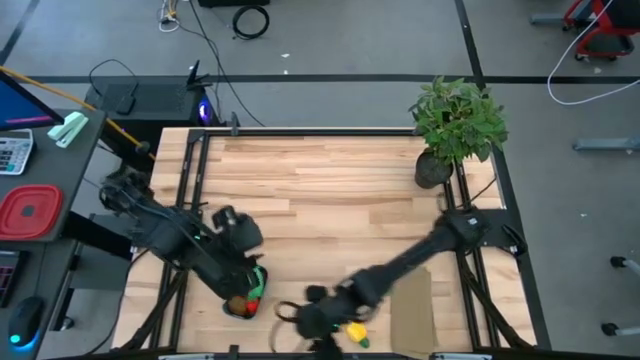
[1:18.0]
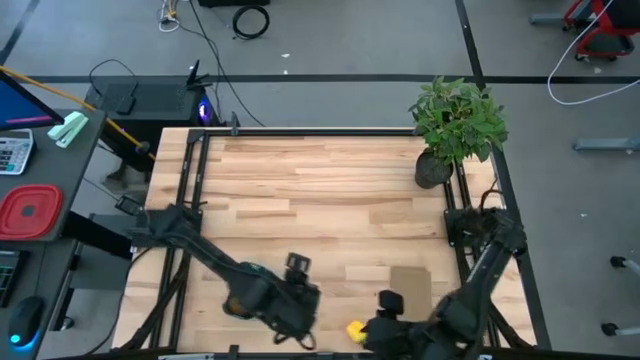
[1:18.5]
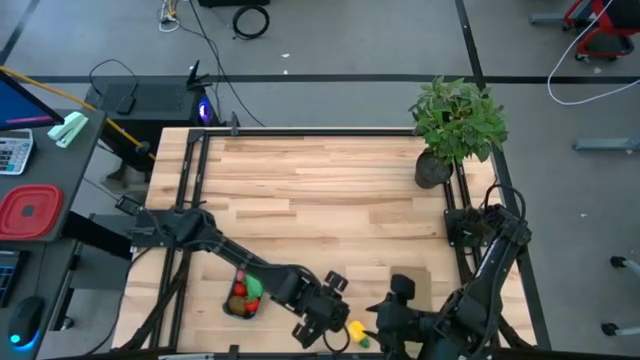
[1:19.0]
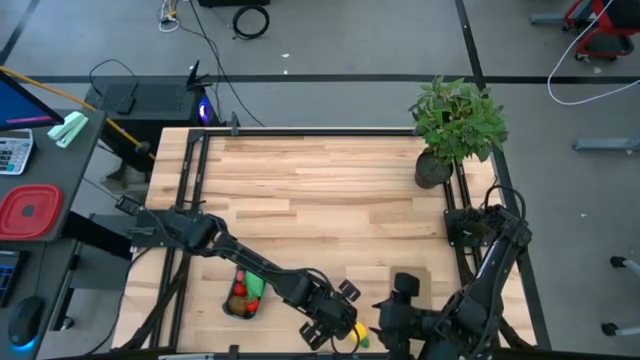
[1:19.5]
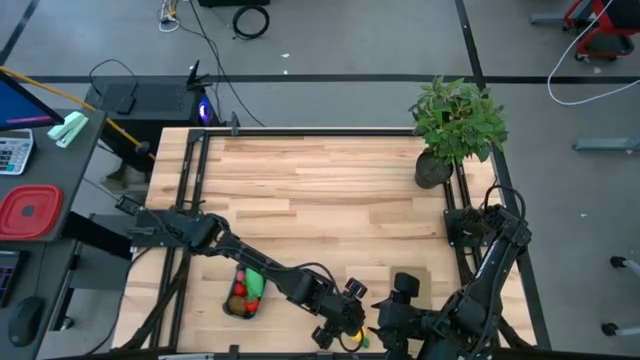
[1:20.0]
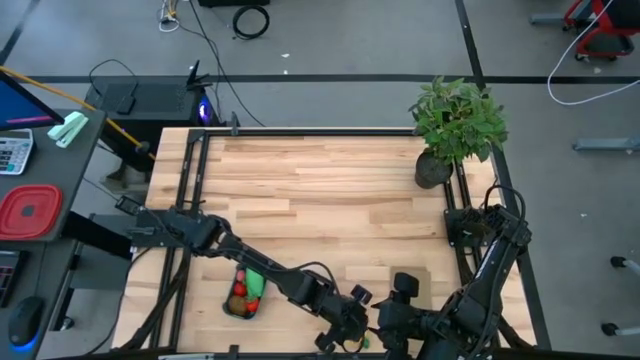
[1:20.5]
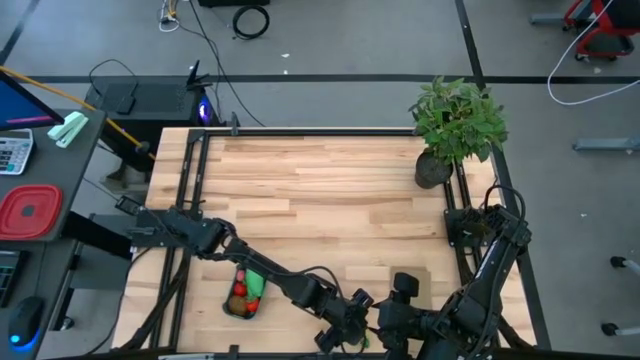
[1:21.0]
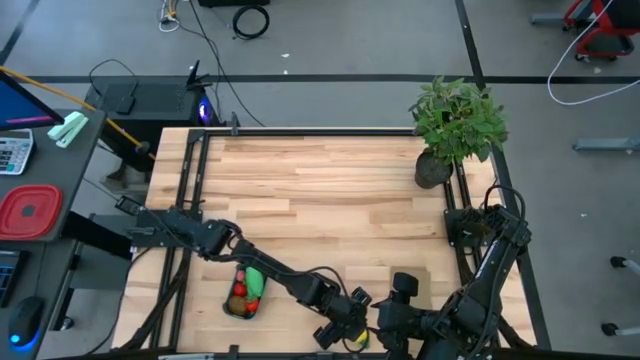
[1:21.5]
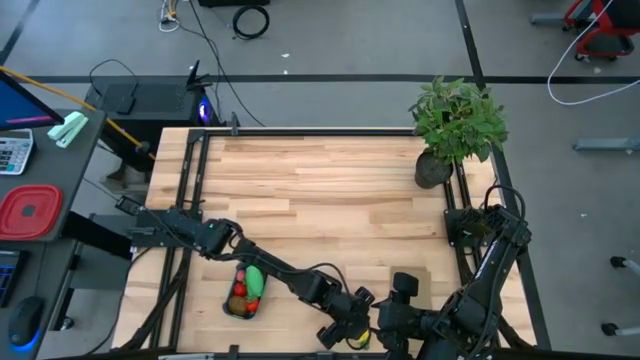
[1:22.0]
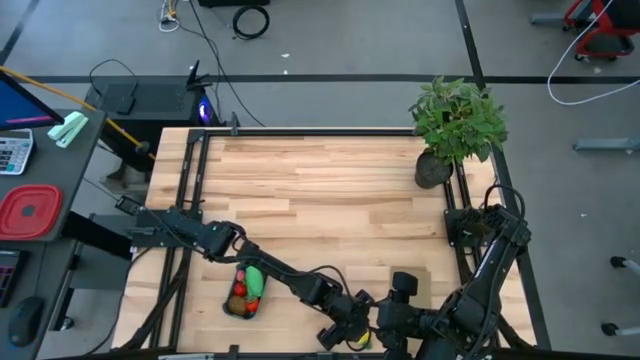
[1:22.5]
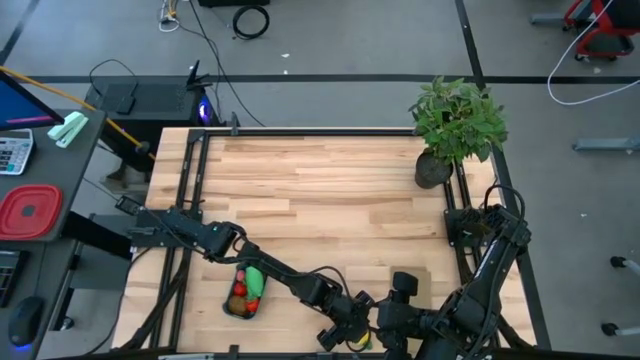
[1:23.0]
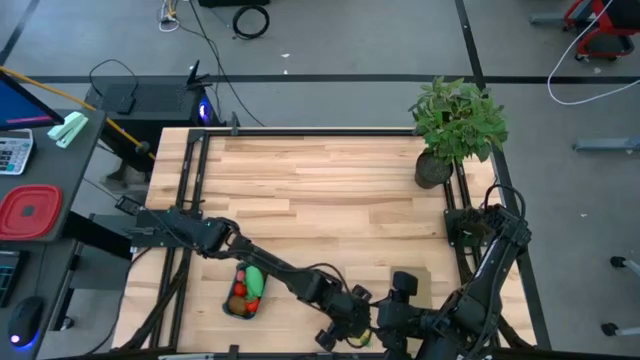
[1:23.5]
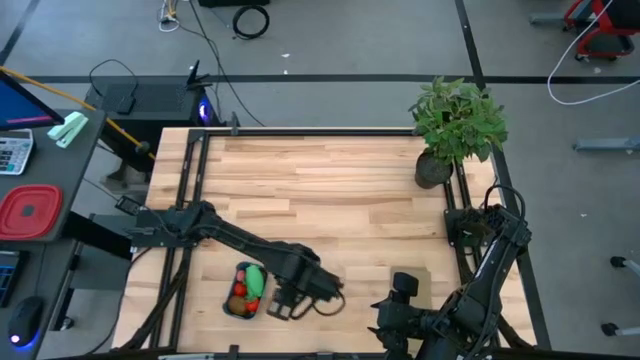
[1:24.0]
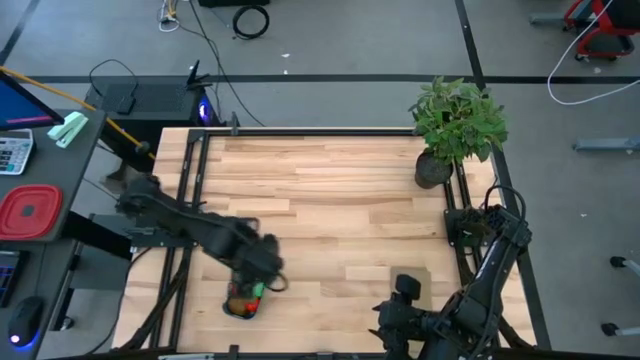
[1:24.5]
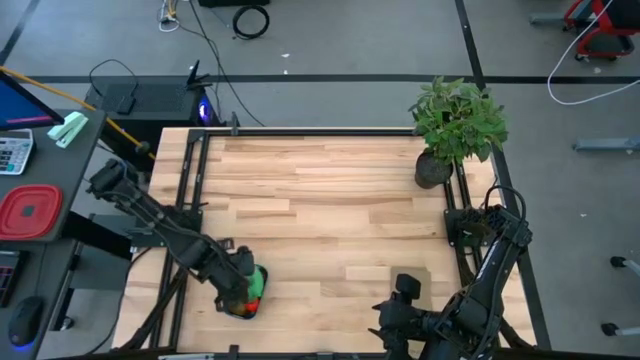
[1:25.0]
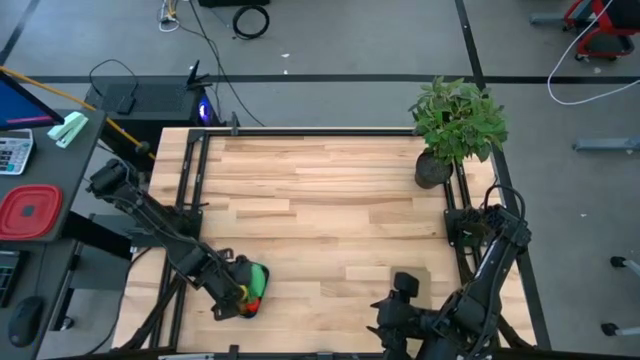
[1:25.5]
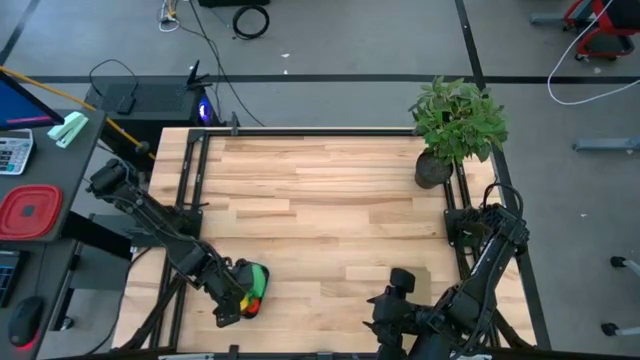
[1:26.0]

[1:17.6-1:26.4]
Task: Pick and placing Produce into tupperware
Put the yellow pineapple into the blue bin

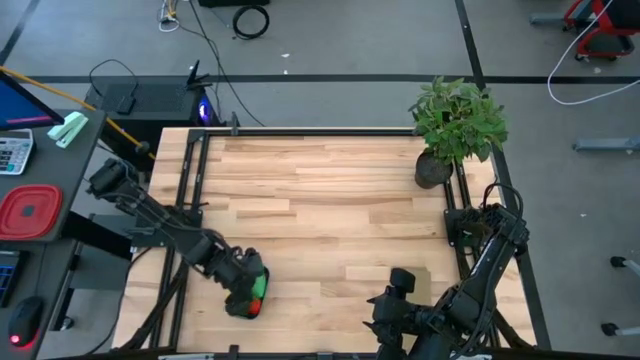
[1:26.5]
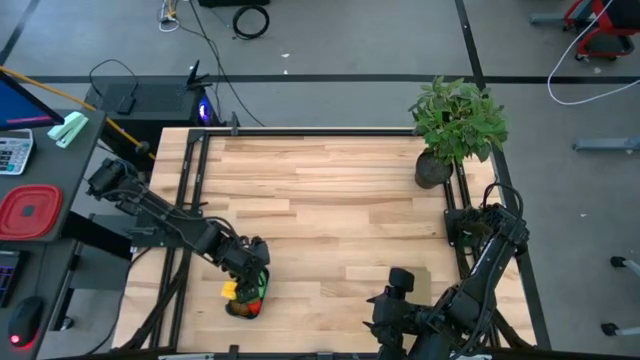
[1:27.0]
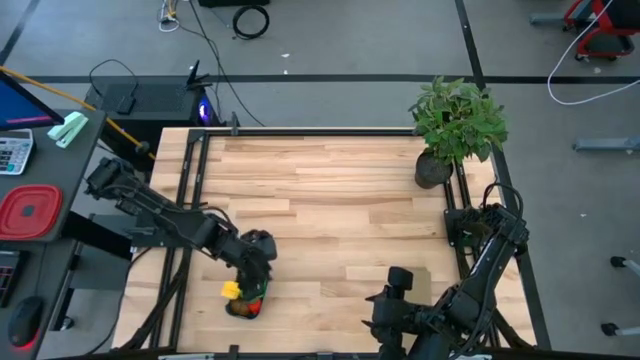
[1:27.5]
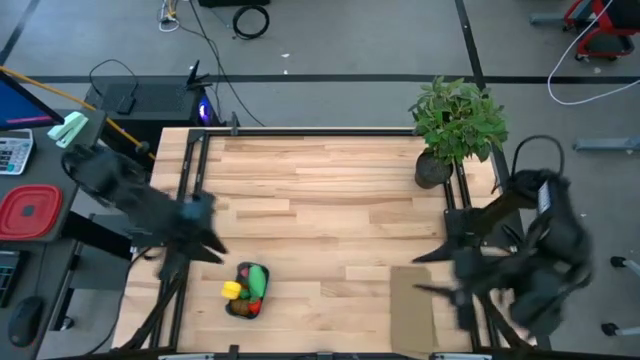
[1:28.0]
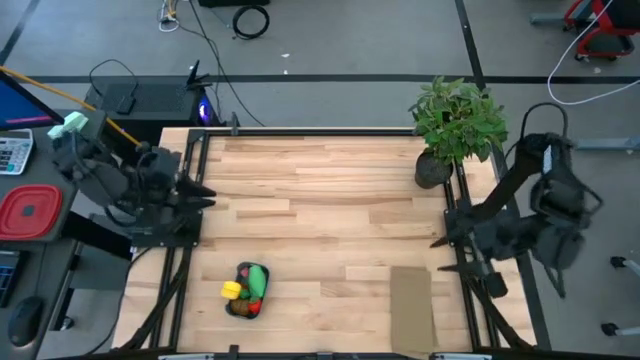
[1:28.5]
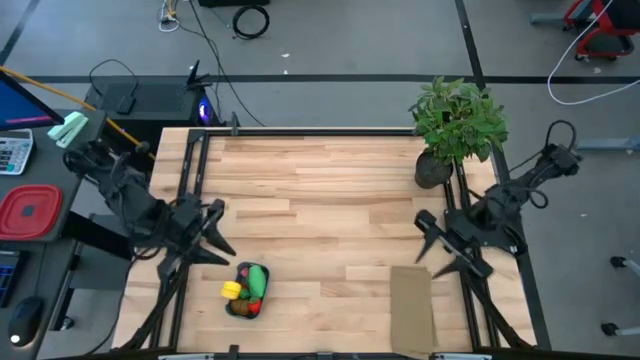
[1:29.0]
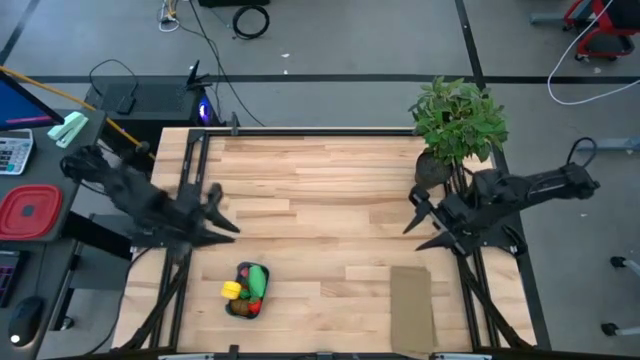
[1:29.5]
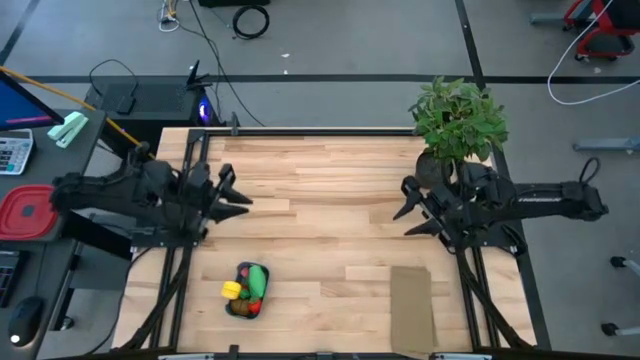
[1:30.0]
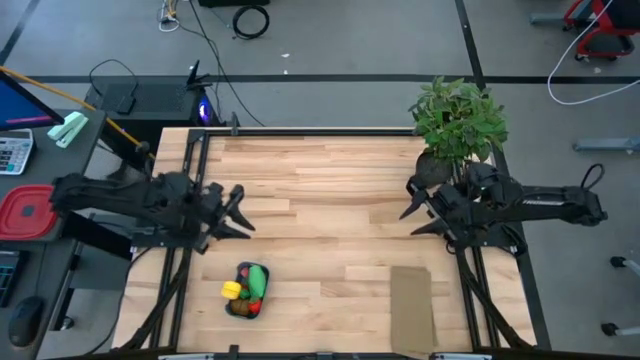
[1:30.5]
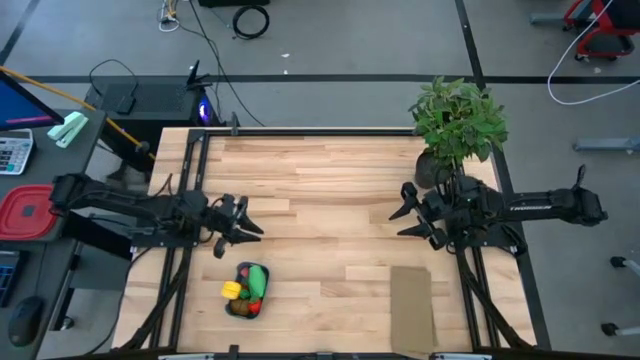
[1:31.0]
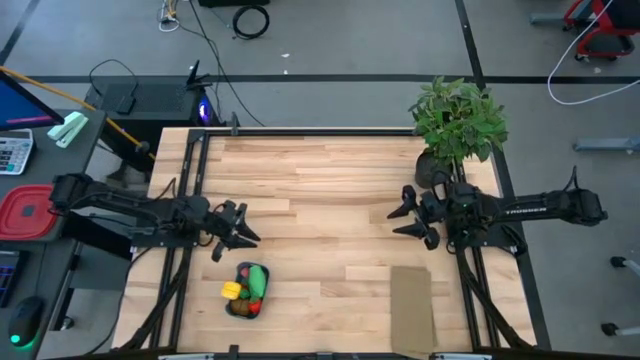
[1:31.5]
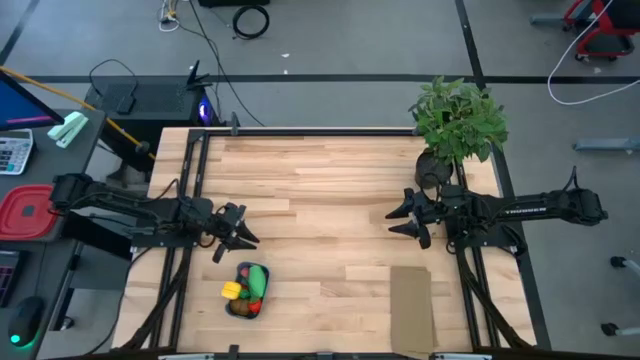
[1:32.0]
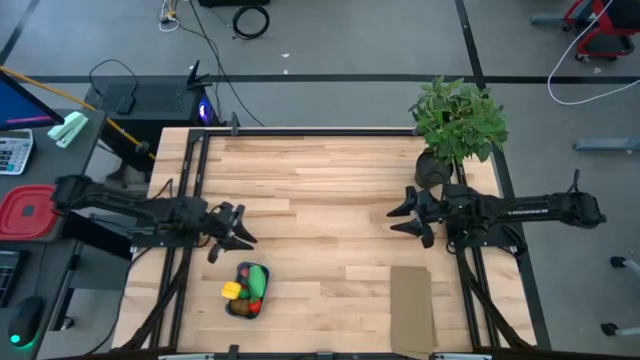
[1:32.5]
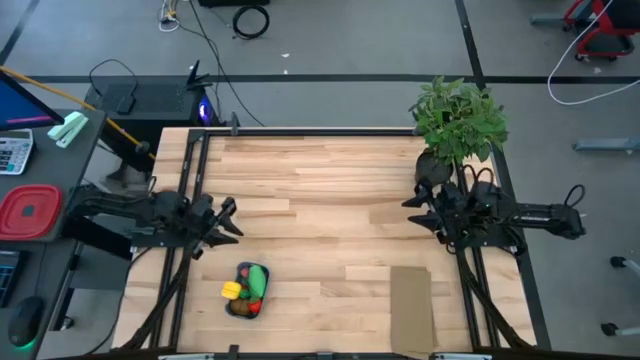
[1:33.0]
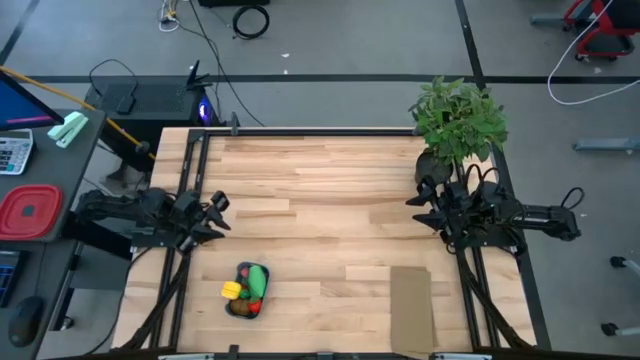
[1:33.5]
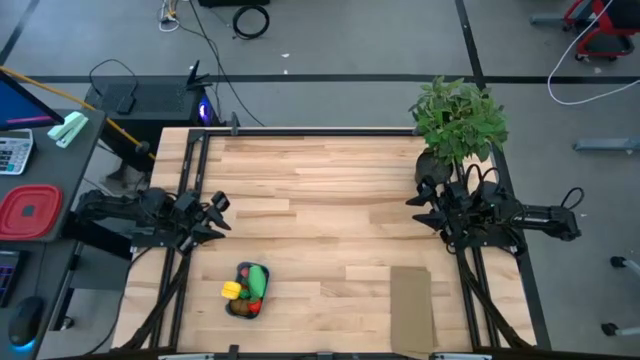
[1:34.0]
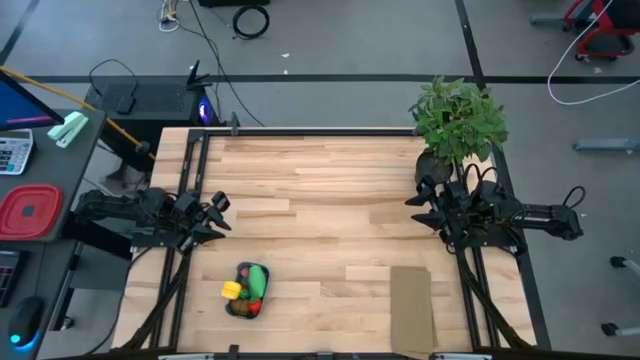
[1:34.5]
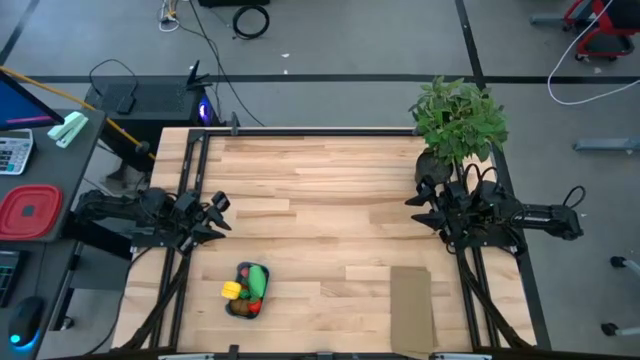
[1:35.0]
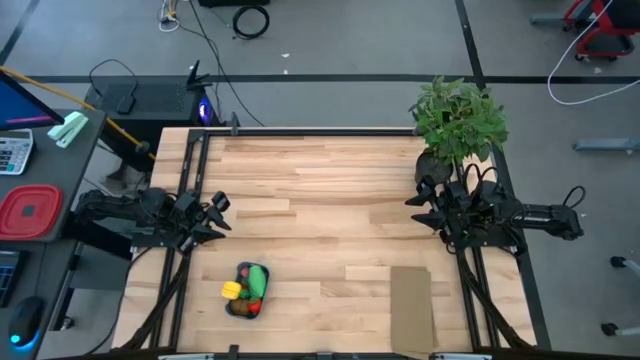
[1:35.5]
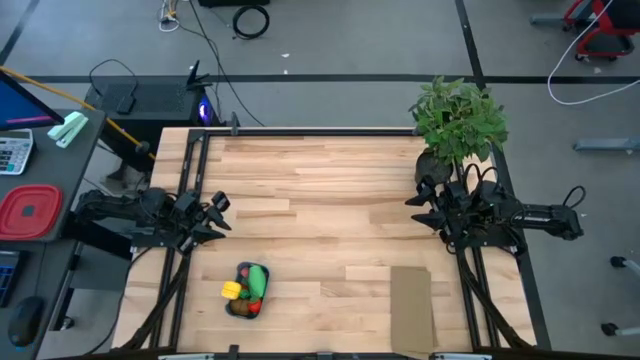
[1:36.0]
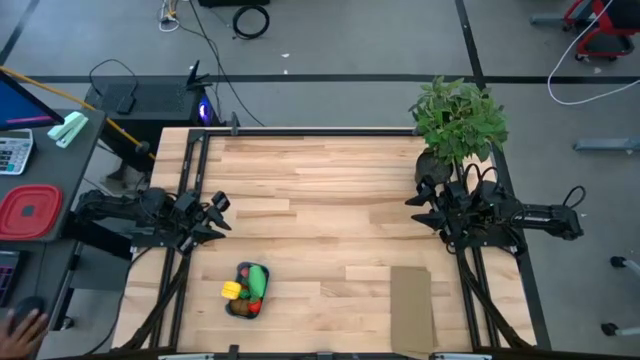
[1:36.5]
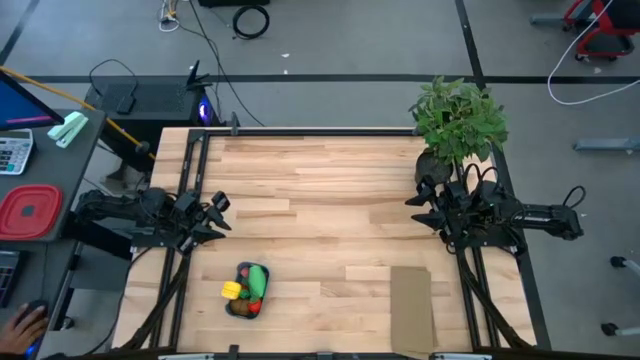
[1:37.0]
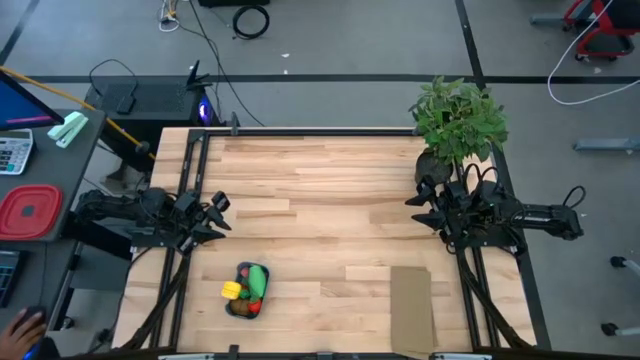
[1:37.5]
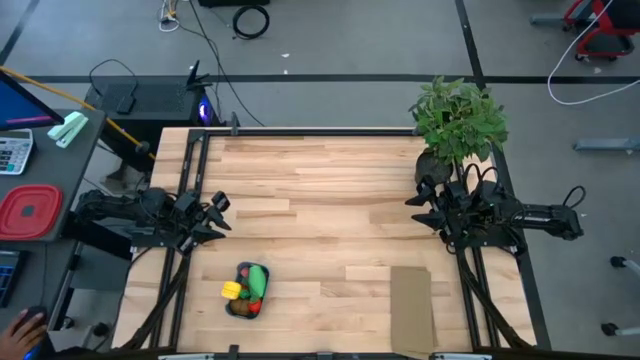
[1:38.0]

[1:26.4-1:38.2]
Return to Home Position

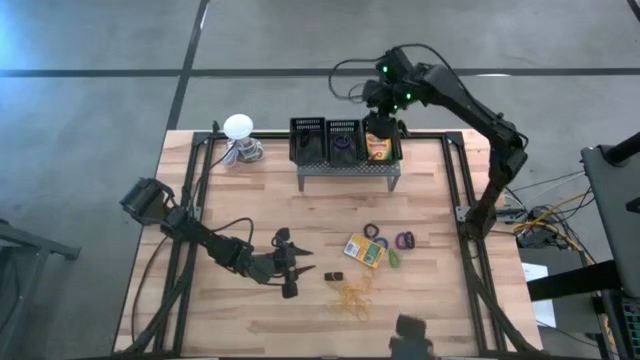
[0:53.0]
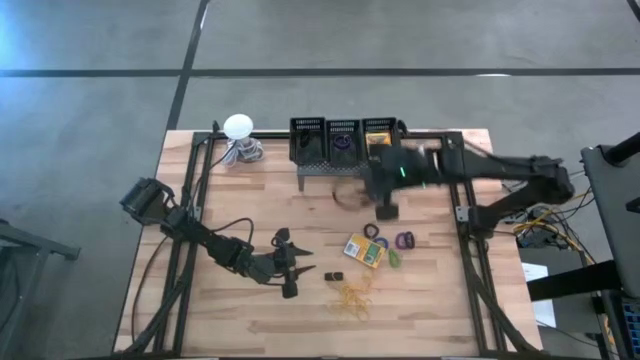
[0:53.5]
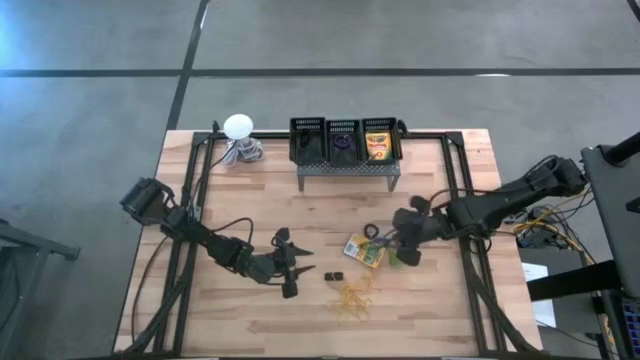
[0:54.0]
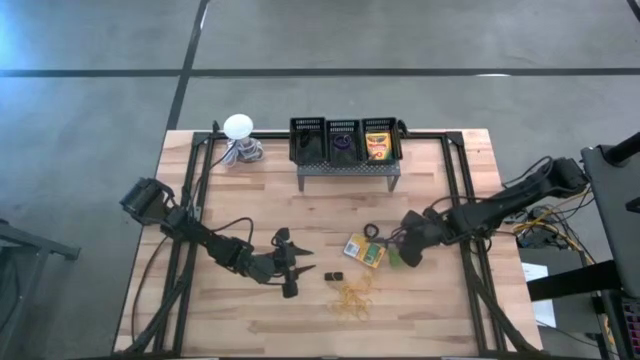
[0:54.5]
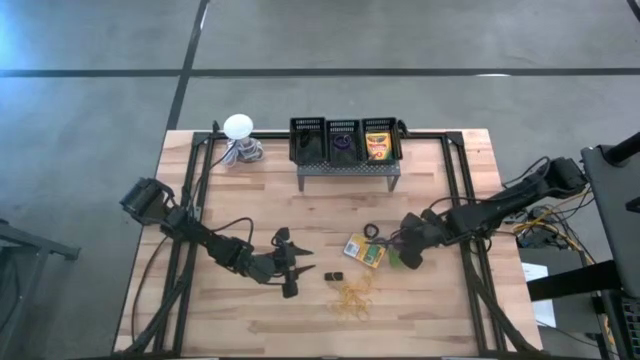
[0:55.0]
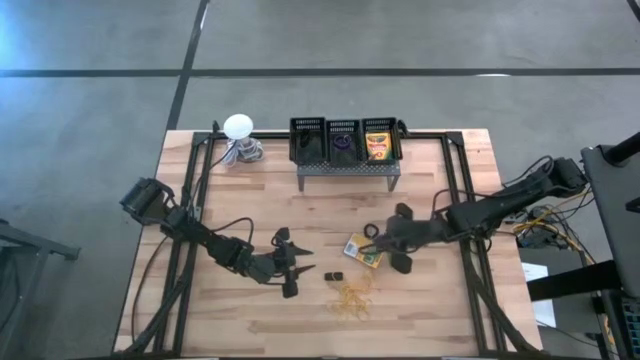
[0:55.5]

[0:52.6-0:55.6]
Task: Pick & Place Office Desk Supplies
Put the black keychain into the middle black bin on the shelf
